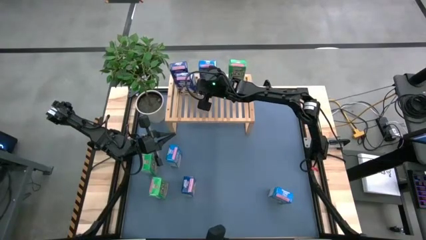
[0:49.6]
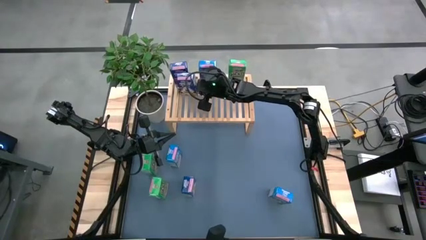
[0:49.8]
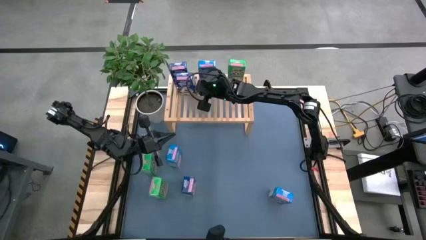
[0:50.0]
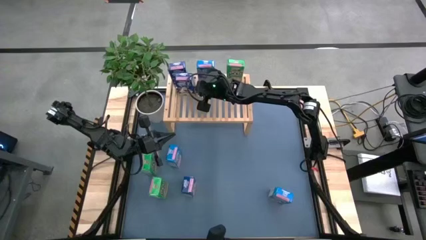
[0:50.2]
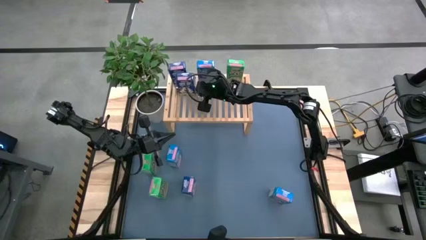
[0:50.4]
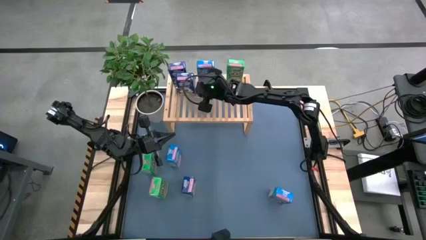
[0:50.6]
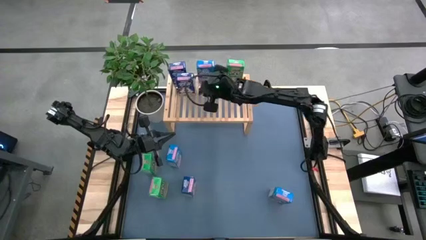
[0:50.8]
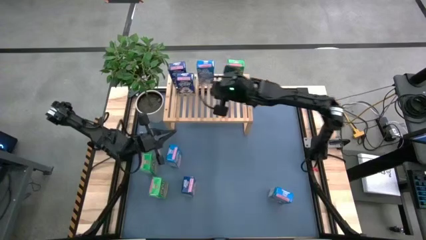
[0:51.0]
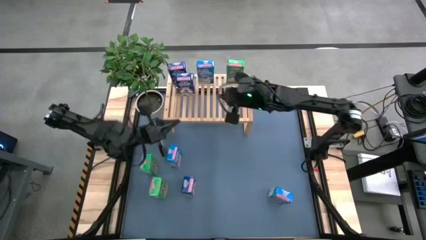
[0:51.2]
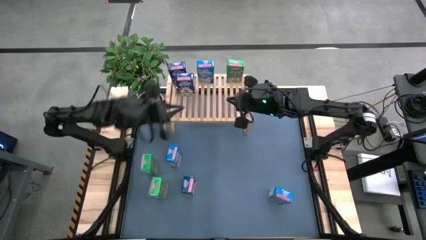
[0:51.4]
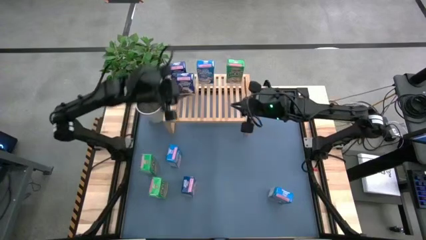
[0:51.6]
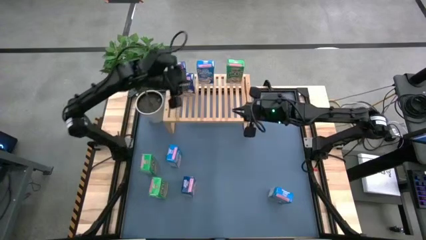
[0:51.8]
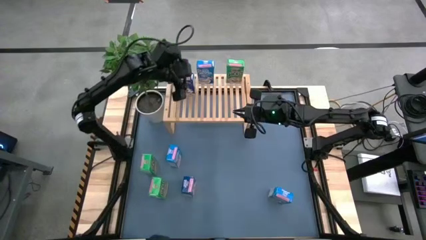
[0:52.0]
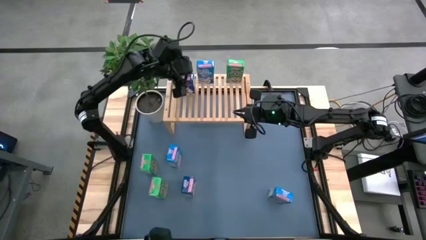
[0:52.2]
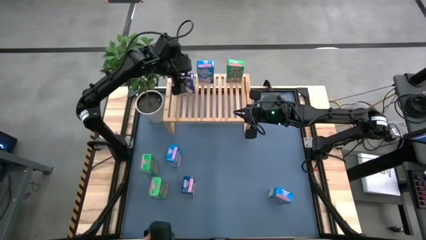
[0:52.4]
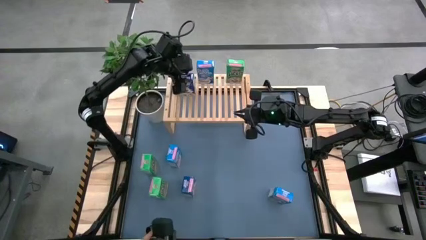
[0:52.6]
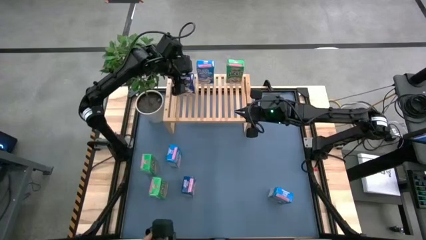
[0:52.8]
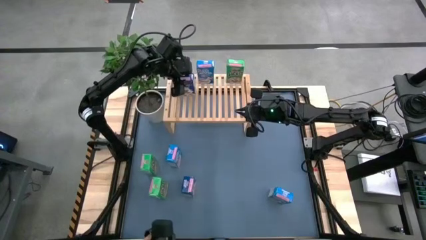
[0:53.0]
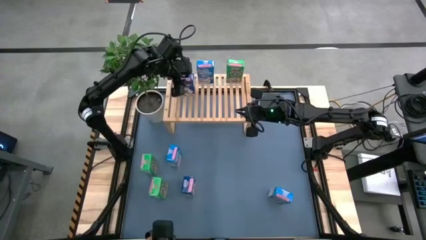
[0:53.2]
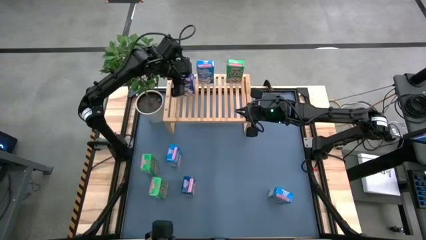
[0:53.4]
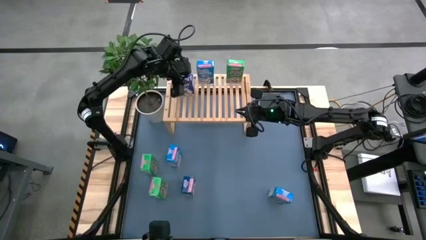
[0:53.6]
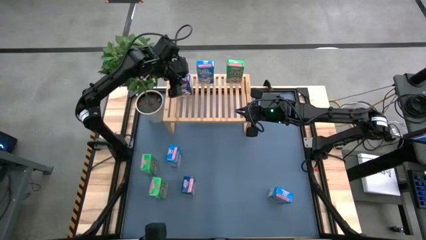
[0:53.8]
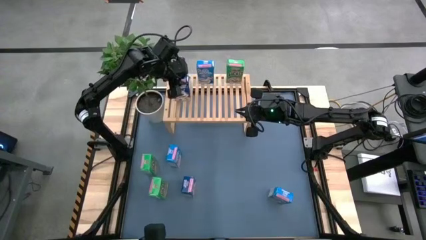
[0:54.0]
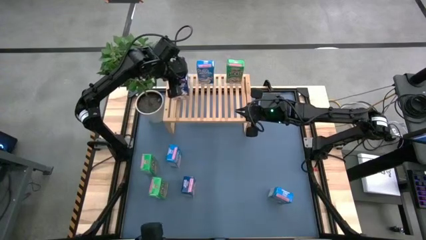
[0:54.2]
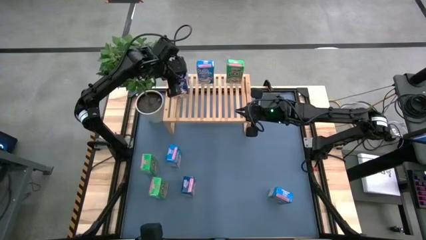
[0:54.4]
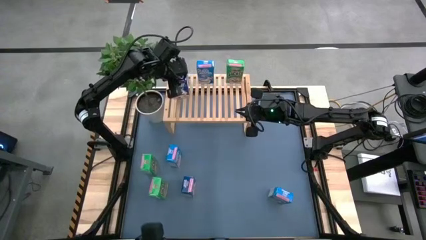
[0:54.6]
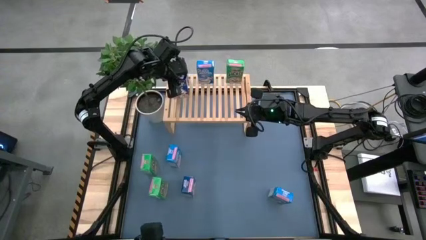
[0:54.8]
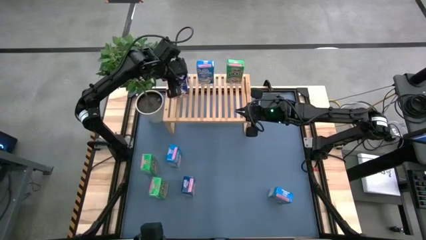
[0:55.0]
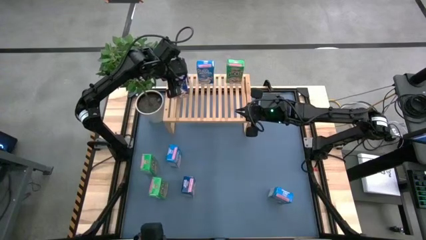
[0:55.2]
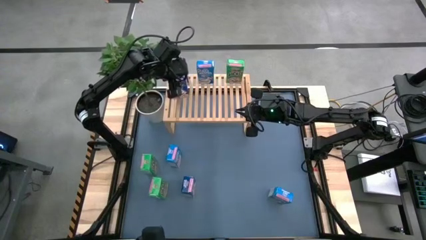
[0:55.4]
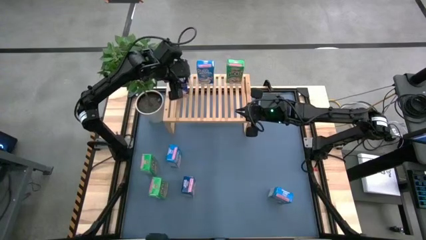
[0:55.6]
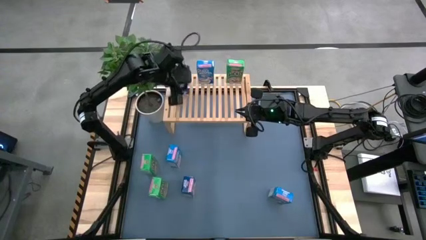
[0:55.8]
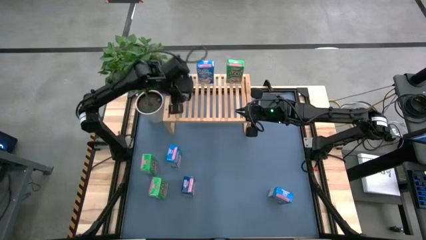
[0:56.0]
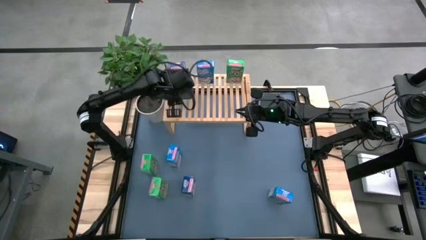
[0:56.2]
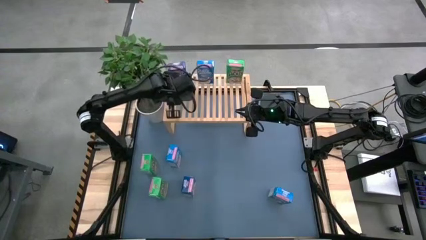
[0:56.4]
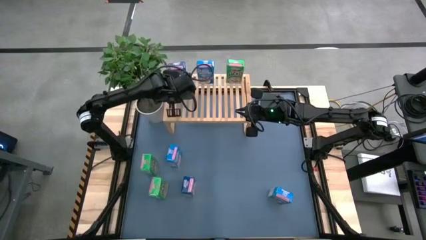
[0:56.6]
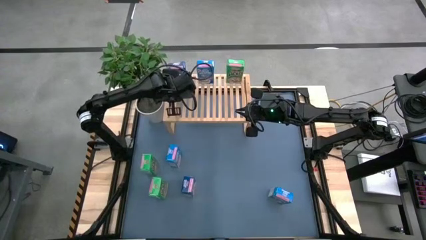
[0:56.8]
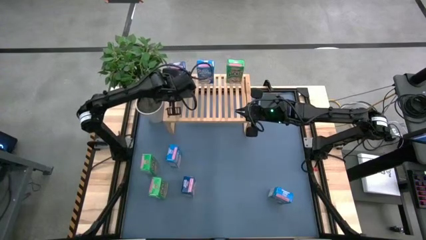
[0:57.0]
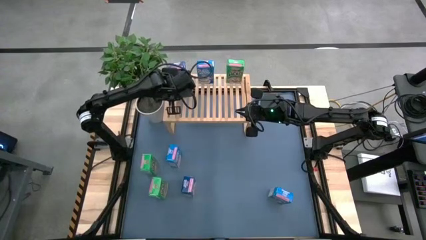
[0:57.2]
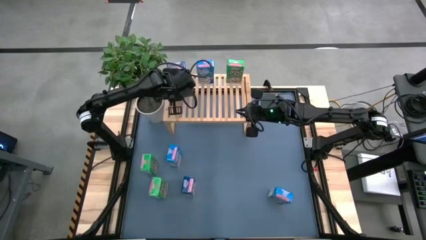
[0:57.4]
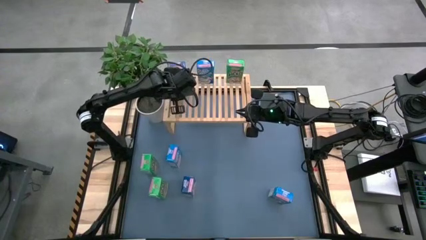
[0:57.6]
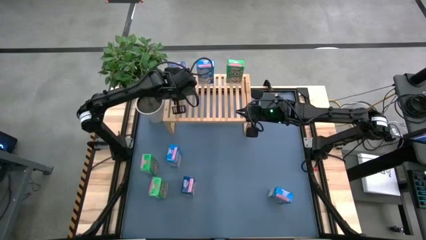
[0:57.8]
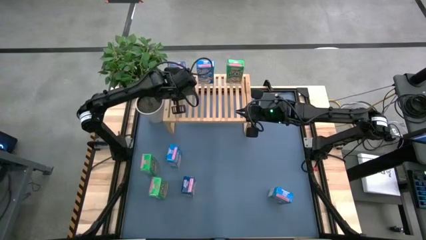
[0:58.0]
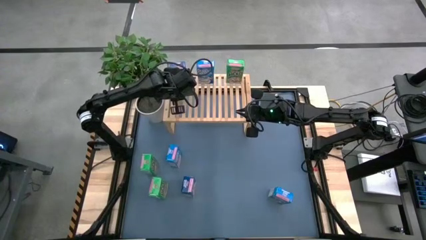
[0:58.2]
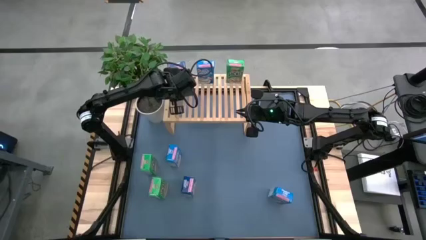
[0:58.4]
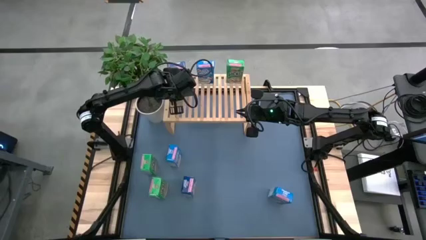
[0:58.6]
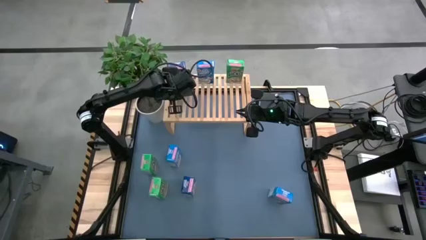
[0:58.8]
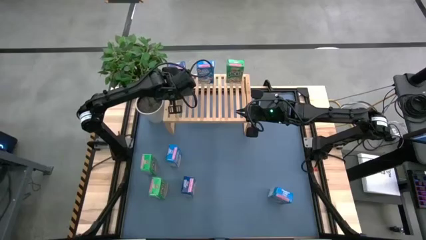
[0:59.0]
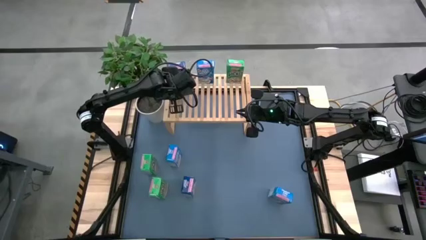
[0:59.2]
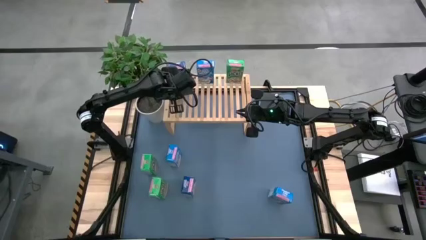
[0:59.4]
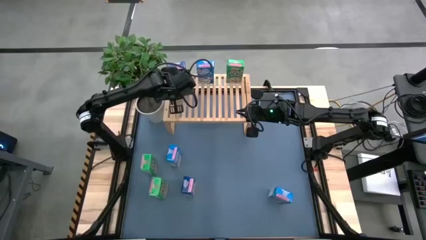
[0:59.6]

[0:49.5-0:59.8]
Task: Stack cereal on shelf
Put the right blue cereal box on the shelf aligned with the blue cereal box

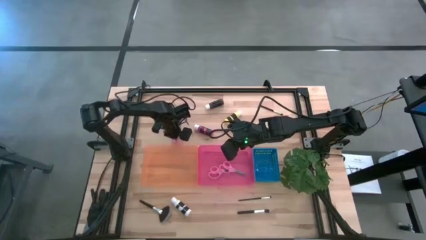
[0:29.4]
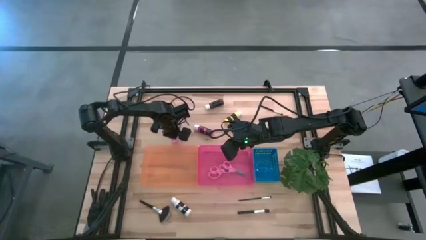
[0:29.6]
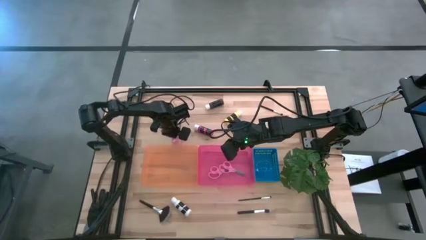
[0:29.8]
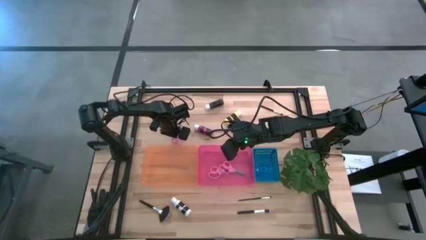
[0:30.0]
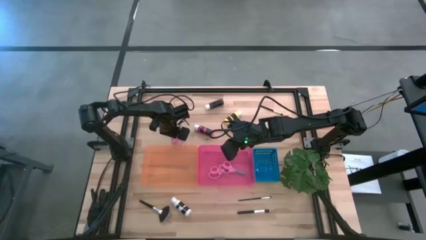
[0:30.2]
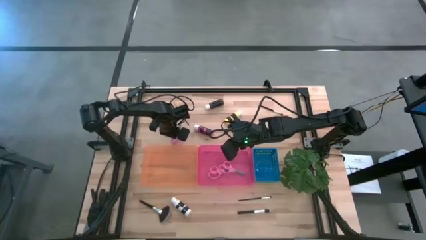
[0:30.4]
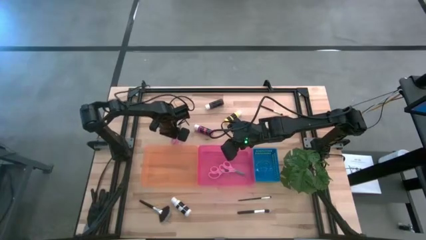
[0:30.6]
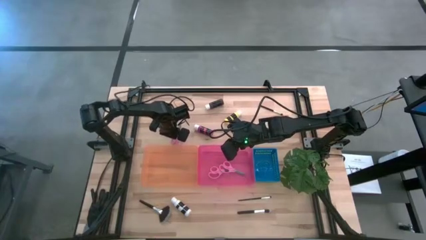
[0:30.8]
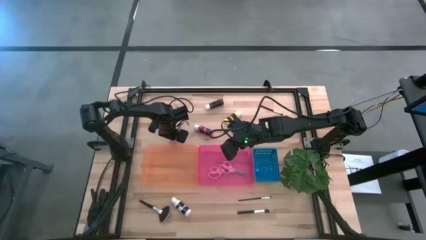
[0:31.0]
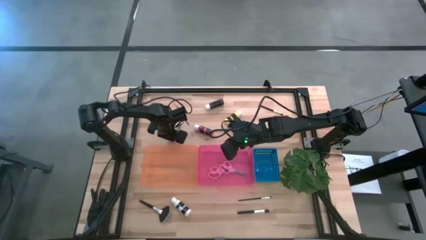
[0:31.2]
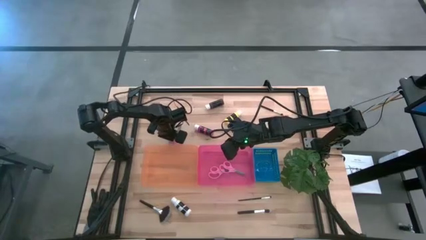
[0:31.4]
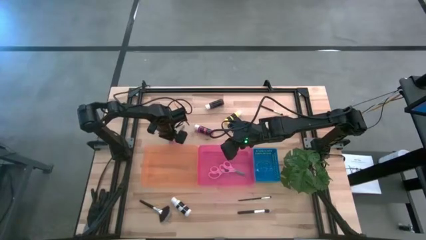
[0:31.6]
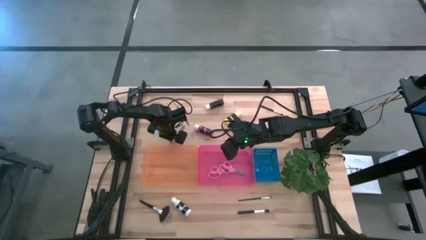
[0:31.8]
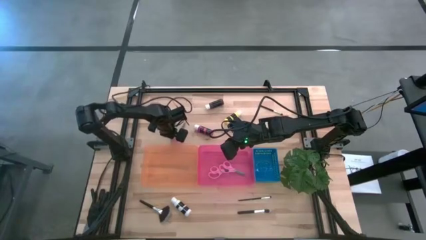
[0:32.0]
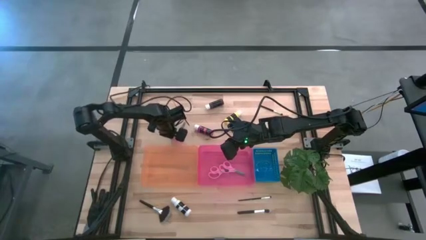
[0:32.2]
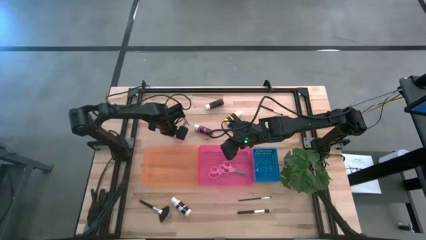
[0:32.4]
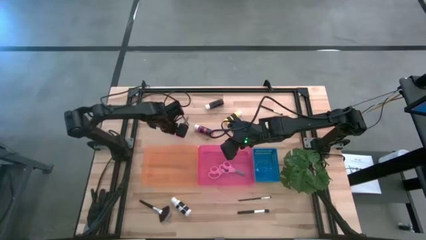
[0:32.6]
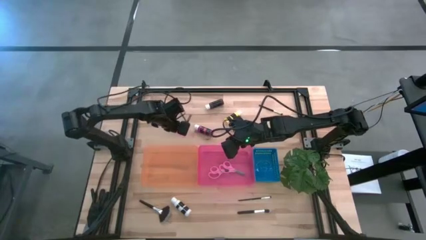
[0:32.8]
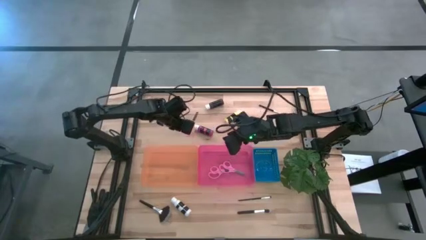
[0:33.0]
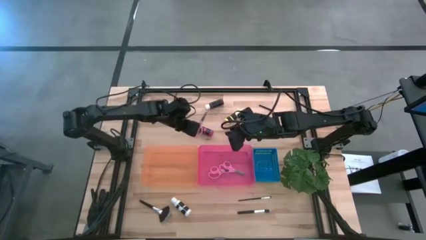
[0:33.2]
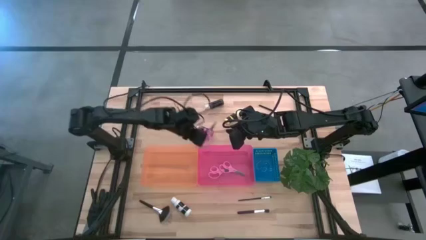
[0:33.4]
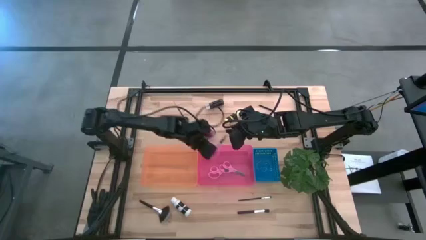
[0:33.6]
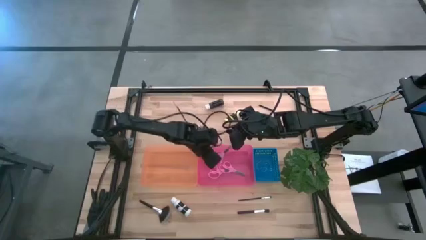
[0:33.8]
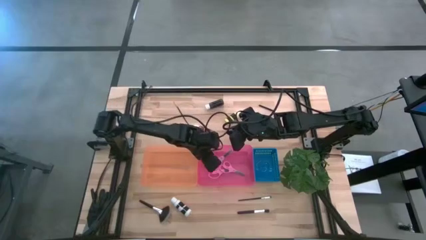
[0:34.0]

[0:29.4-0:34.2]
Task: Pick & Place Paint Supplies
Put the pink scissors into the pink bin
